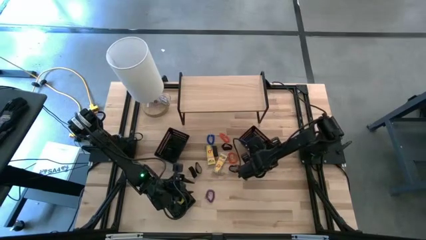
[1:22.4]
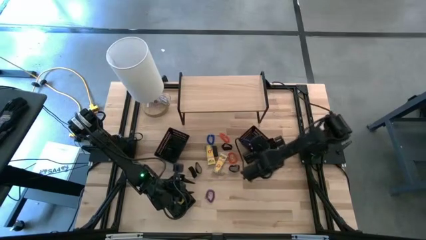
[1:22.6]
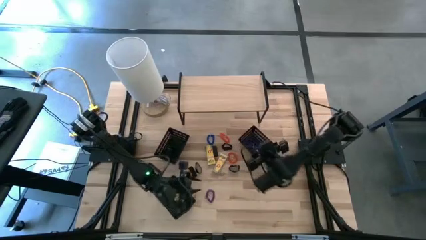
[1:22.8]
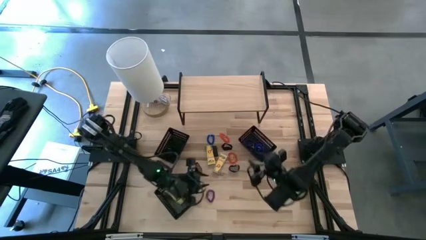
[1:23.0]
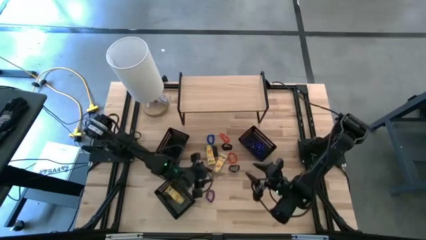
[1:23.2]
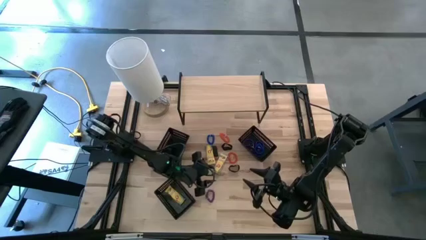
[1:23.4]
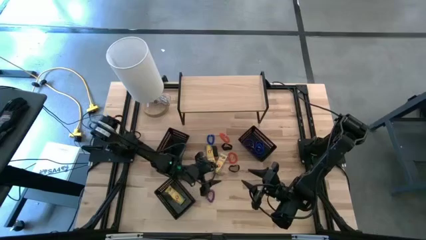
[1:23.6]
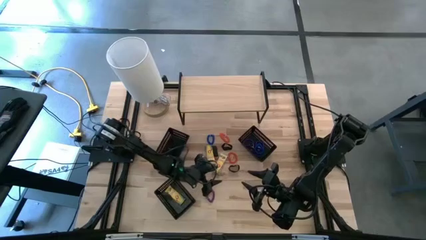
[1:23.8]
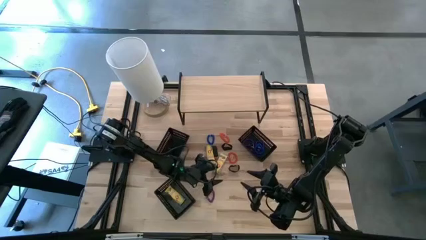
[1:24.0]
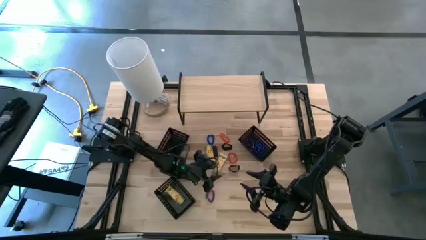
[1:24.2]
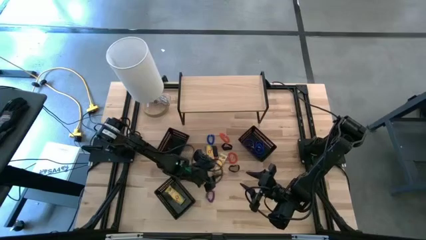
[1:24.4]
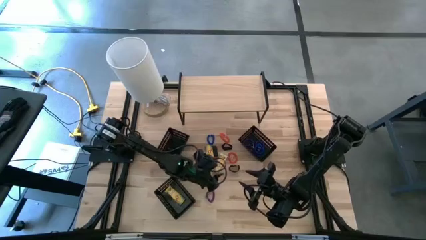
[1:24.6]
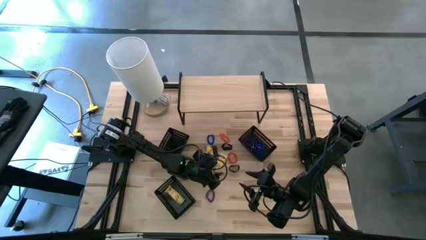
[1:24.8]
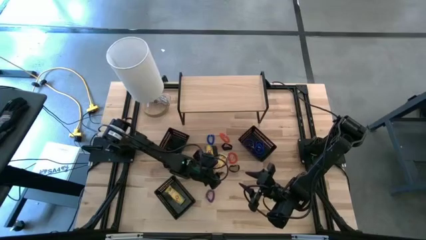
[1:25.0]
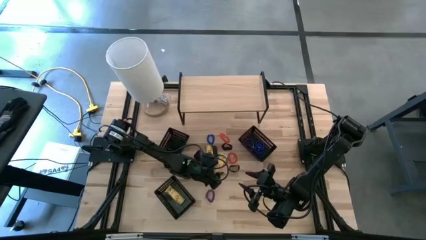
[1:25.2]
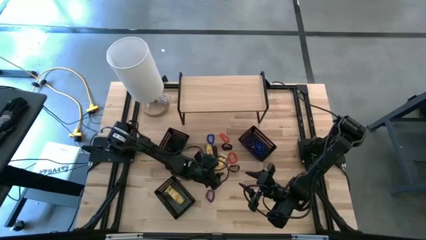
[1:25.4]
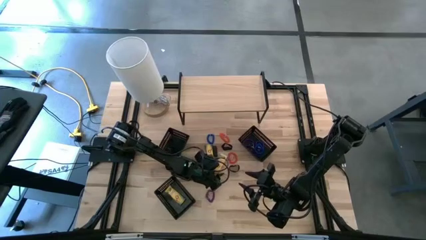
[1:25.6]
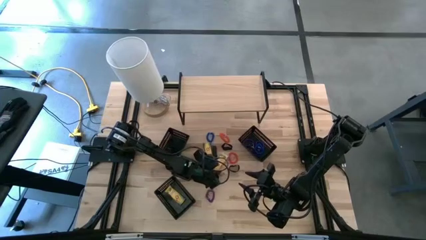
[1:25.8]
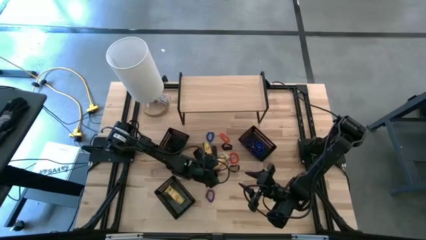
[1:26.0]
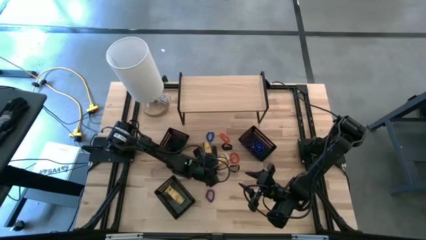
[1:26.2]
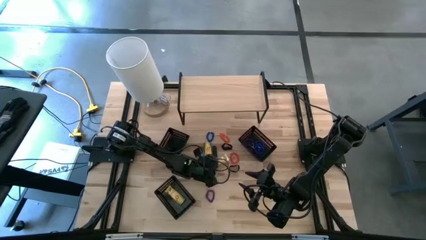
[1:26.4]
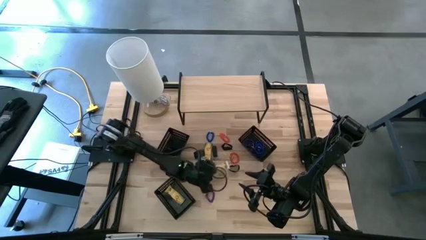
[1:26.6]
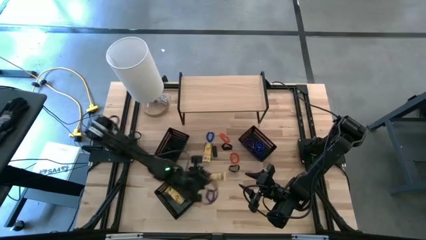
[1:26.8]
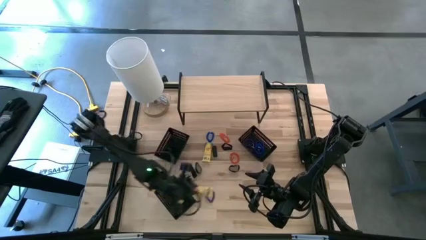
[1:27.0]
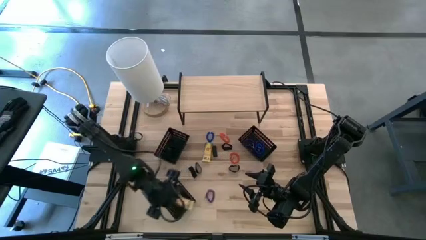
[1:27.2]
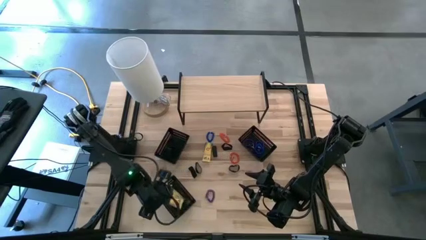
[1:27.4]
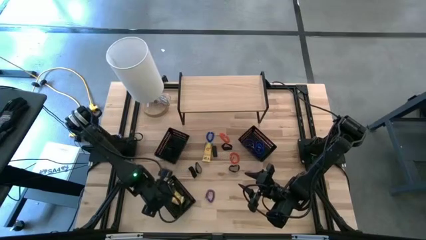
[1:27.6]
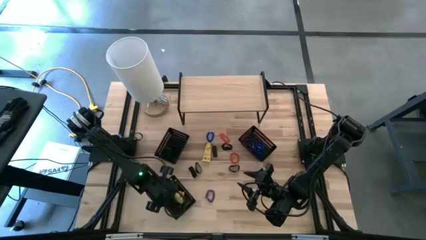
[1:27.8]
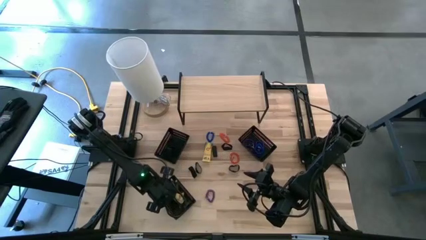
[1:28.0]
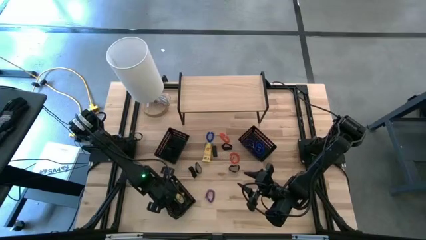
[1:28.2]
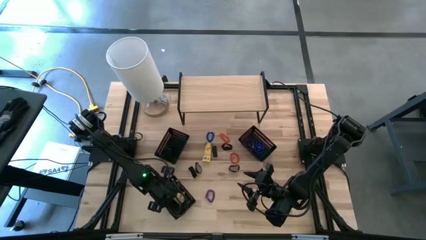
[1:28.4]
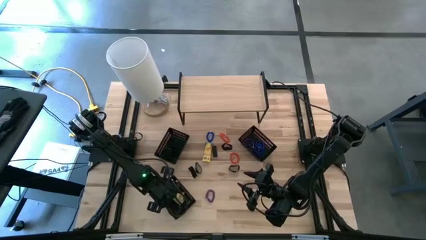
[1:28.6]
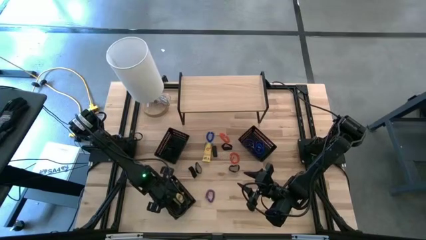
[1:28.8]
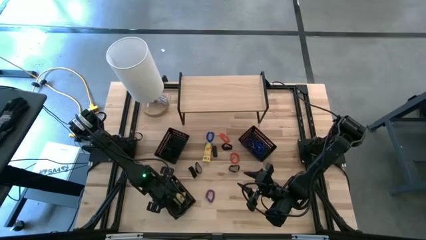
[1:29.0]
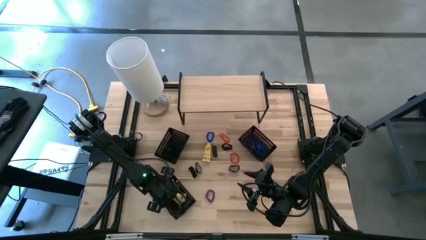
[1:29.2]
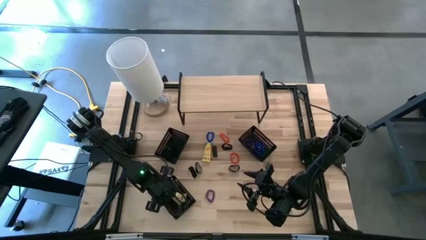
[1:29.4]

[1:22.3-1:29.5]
Task: Pick & Place Office Desk Supplies
Put the right crayon box into the bottom black bin

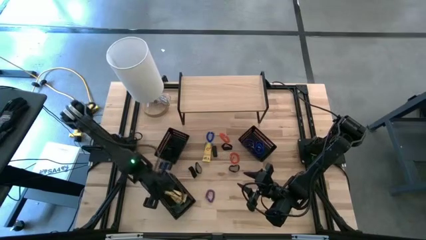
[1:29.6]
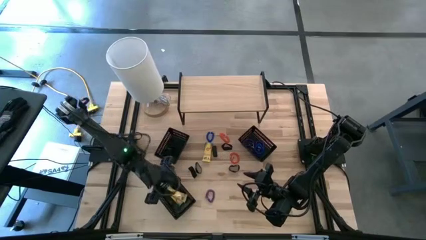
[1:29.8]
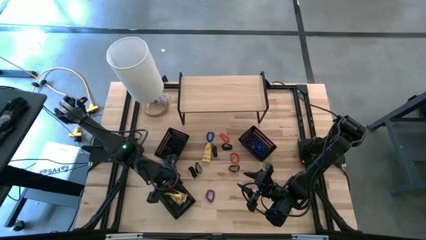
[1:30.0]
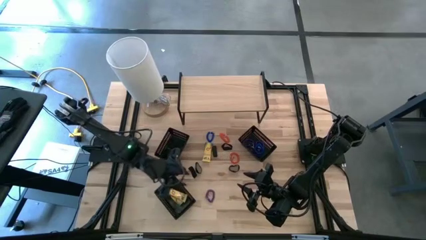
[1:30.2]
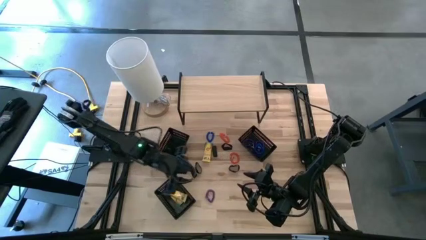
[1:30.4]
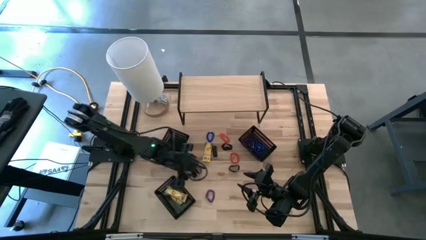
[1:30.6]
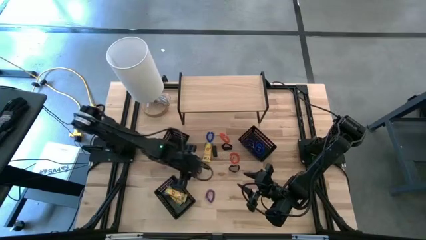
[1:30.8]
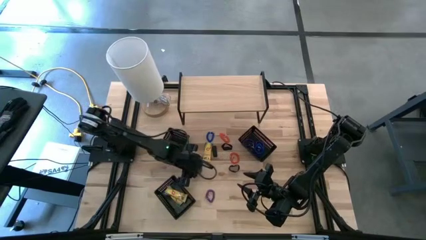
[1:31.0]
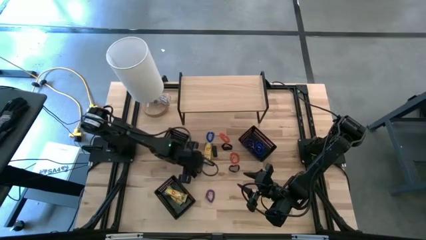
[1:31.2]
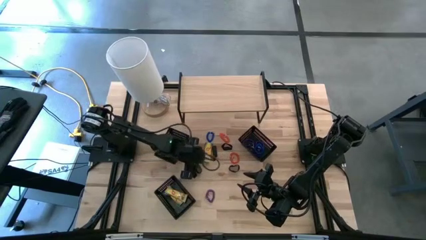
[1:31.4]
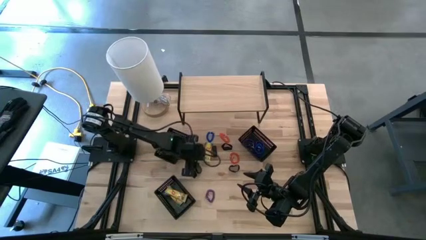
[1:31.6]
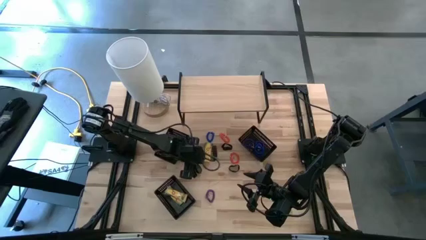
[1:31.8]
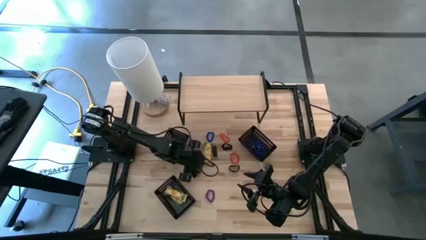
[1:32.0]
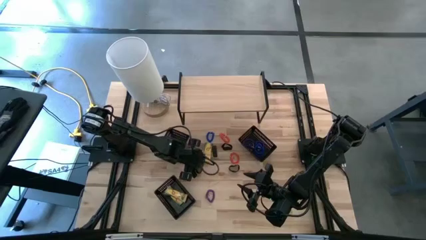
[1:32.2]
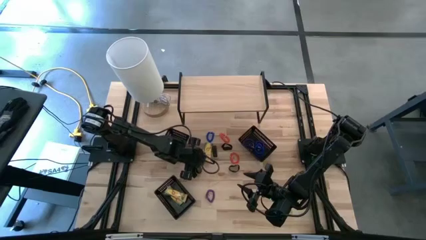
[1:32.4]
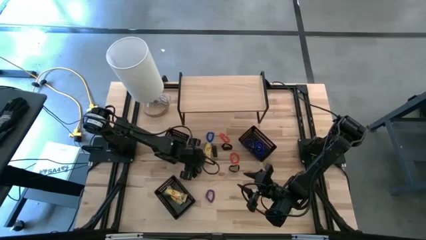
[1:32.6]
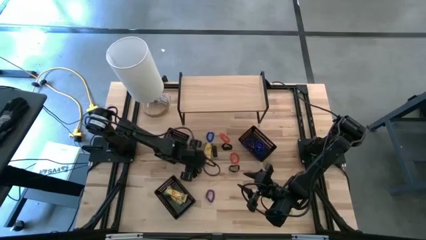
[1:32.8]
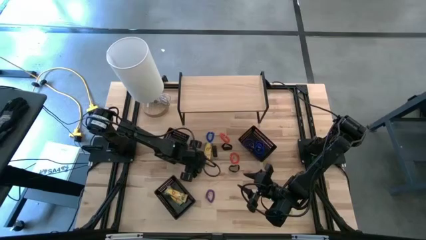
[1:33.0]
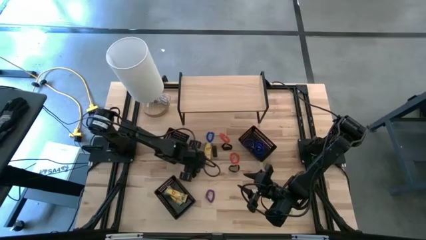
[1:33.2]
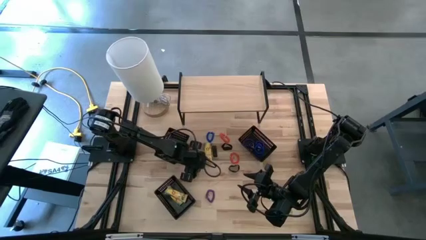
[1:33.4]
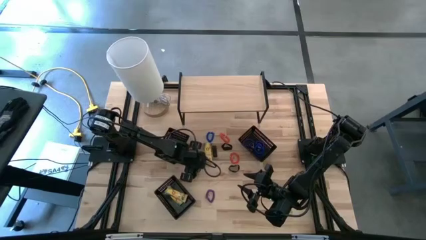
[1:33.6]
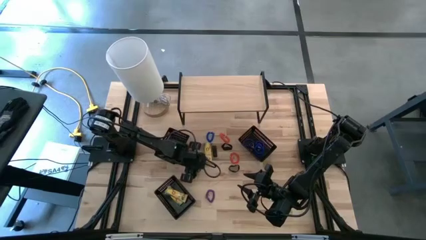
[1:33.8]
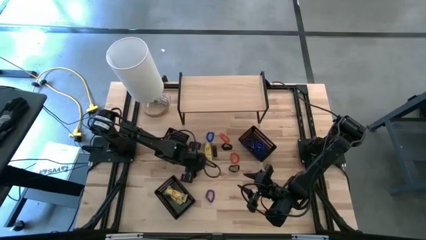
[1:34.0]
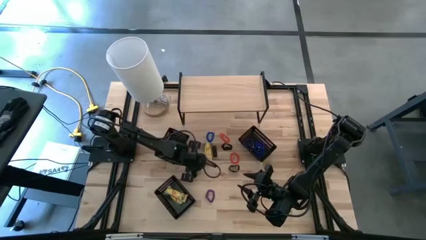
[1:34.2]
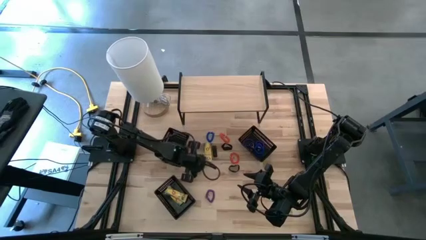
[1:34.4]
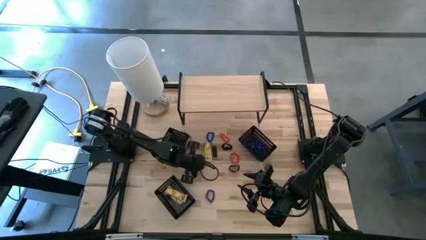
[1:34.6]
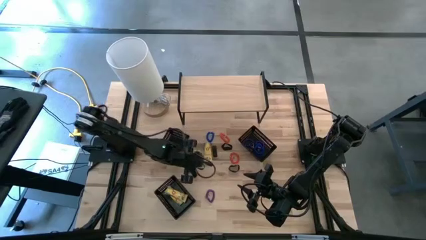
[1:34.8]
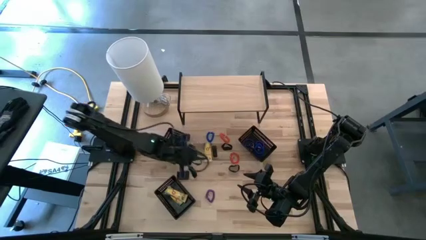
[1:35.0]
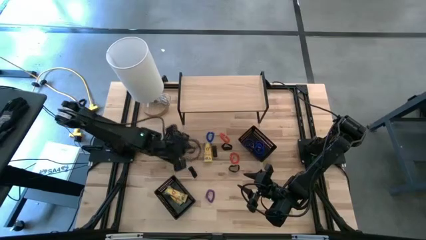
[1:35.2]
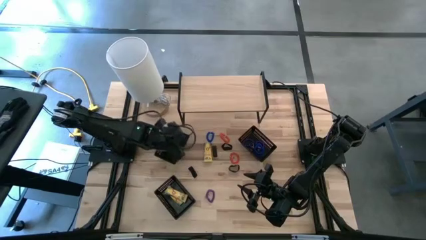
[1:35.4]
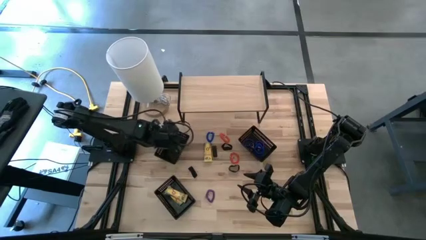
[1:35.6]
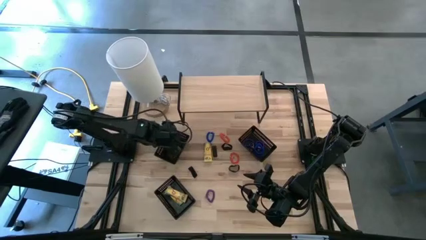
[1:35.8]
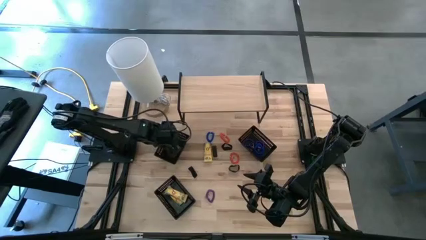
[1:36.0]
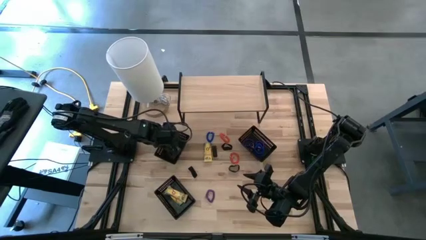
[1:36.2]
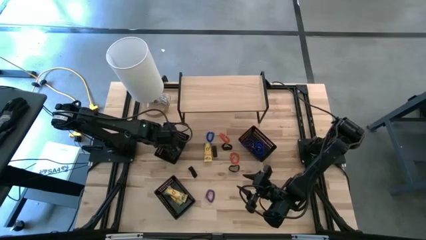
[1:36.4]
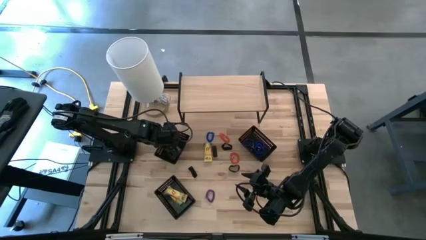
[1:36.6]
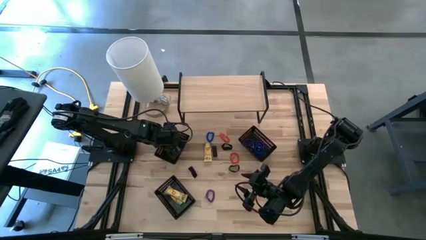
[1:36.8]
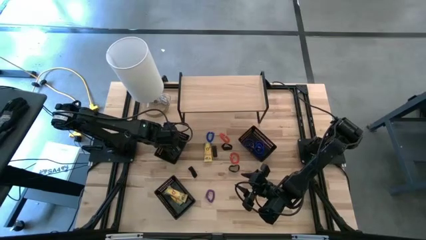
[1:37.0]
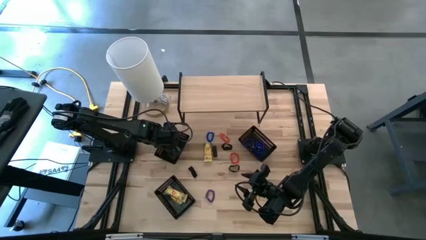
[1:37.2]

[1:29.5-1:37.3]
Put the black rubber band into the top left black bin
